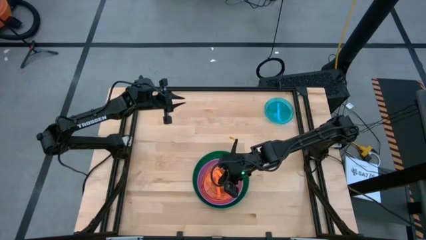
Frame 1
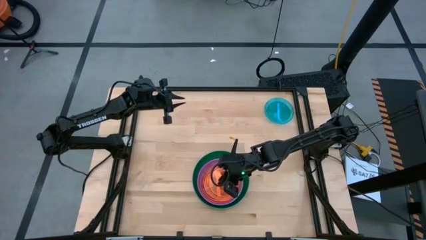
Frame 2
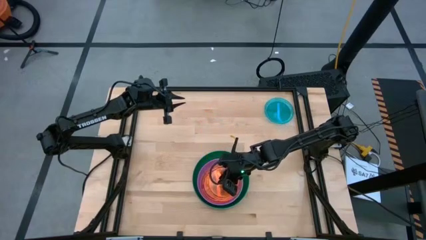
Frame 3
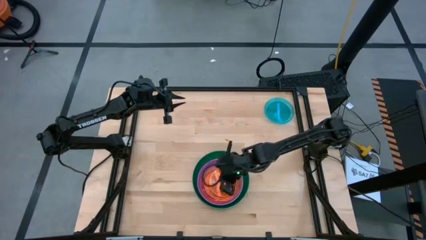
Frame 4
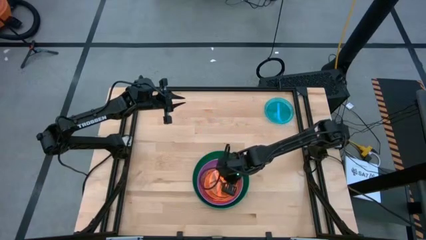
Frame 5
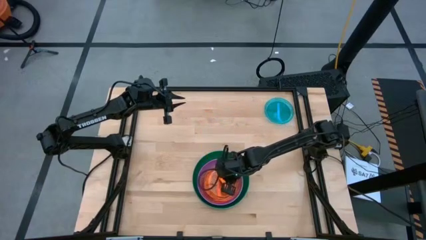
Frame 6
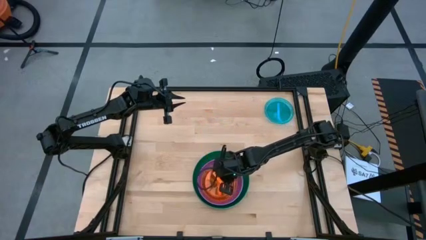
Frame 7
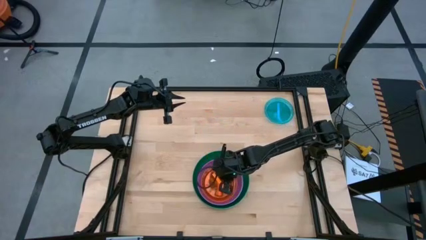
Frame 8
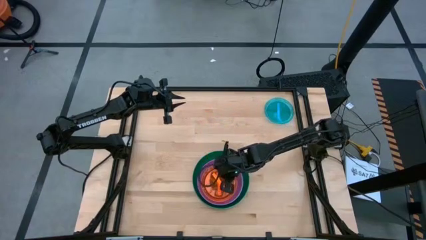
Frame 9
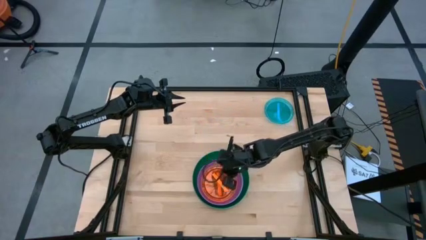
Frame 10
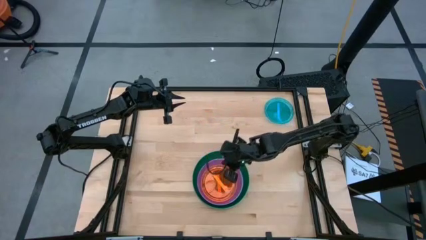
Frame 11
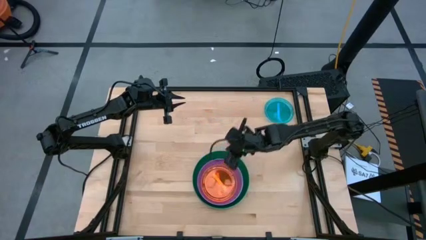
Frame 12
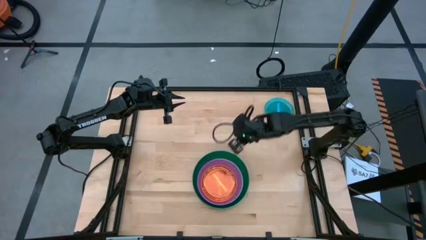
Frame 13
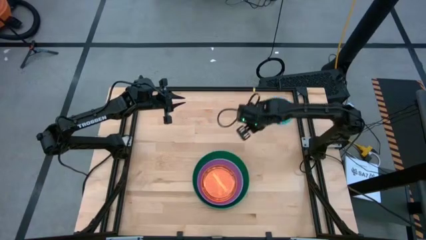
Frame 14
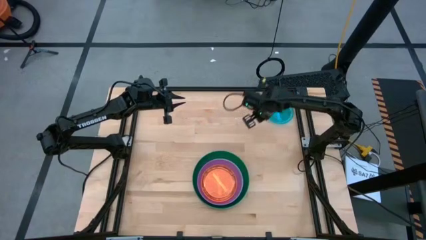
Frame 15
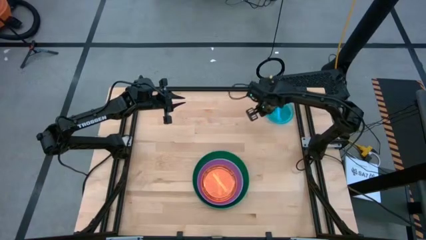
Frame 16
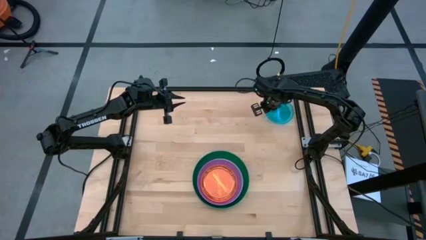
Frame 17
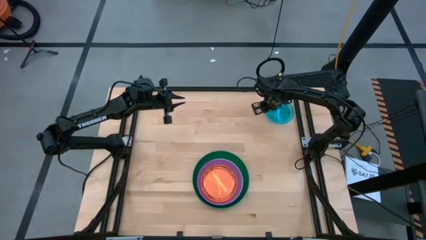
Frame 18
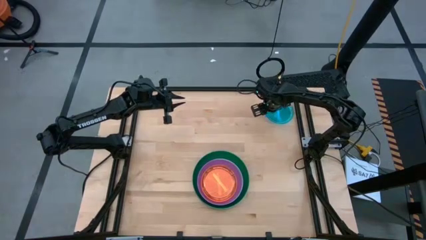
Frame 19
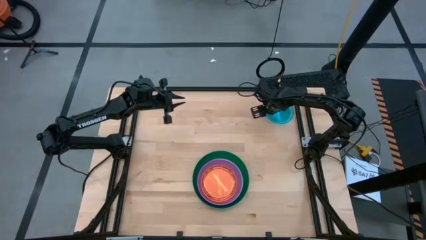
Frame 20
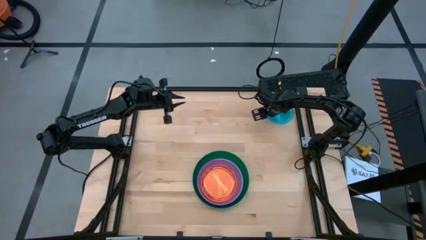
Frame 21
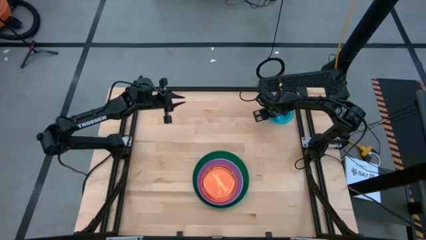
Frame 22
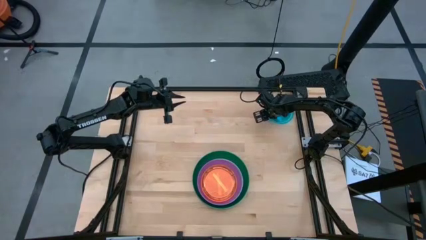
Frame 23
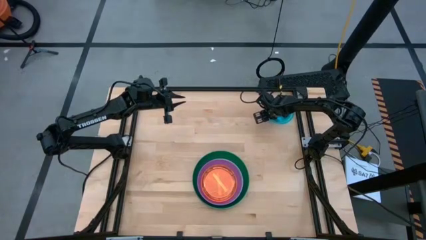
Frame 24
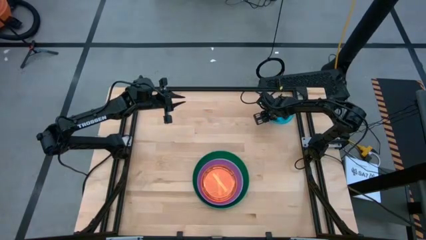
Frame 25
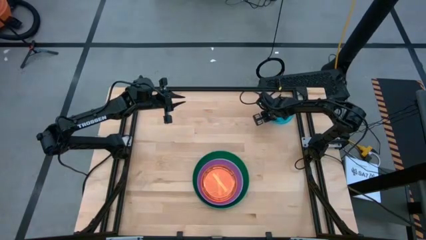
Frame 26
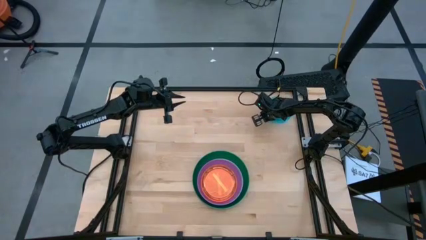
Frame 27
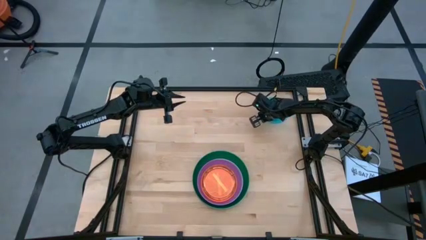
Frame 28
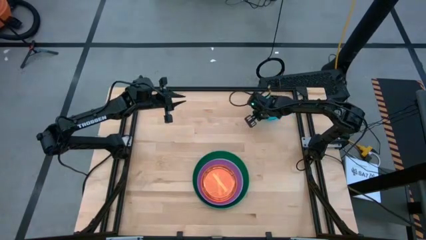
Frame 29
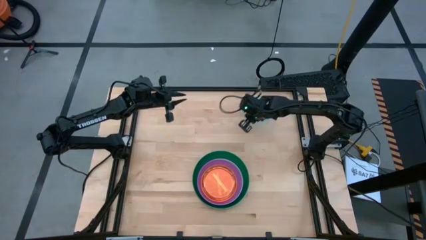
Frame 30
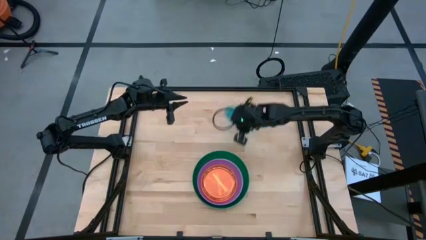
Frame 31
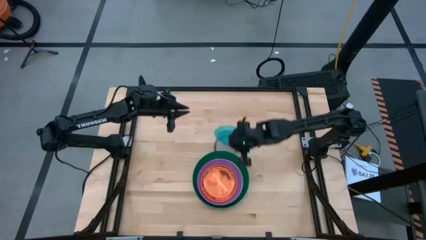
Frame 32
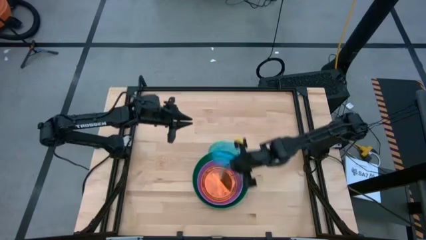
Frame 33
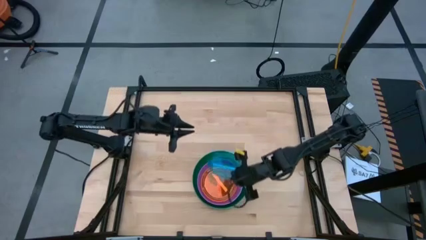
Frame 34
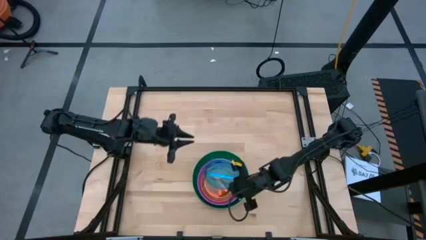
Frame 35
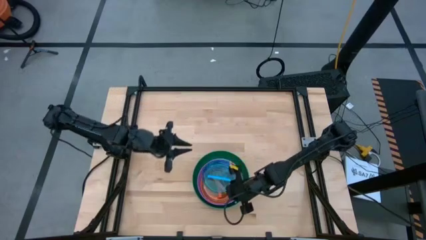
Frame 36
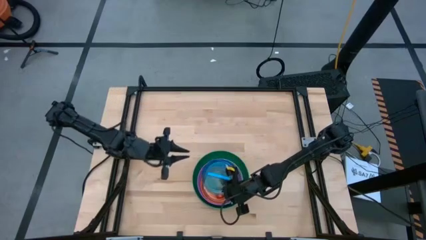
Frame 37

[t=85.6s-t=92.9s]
Task: Stack plastic plates
Stack the transparent blue plate on the transparent orange plate

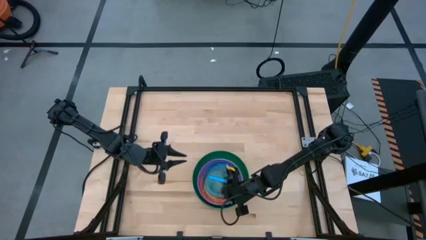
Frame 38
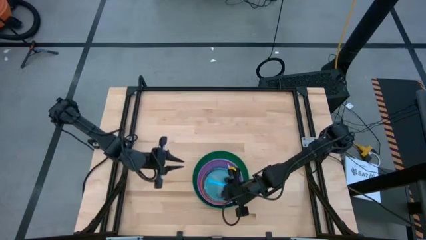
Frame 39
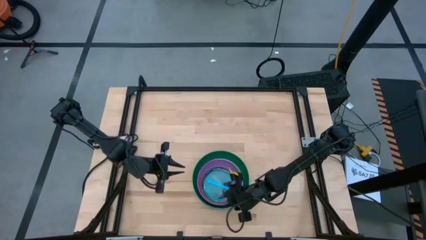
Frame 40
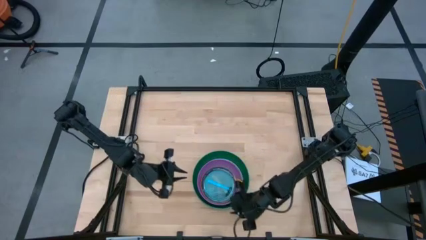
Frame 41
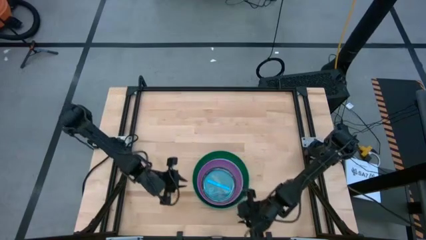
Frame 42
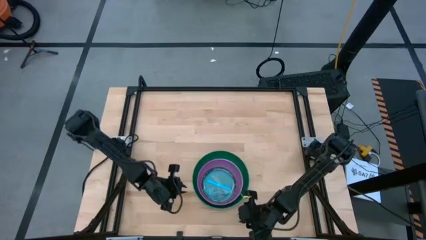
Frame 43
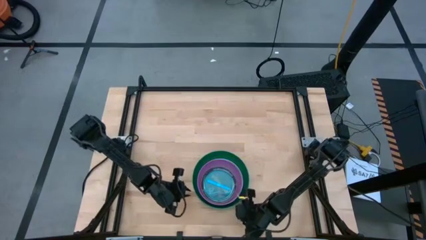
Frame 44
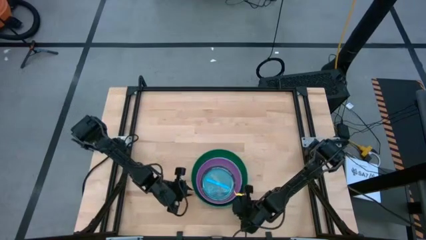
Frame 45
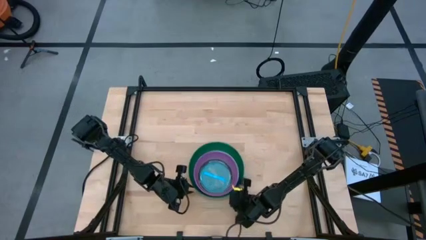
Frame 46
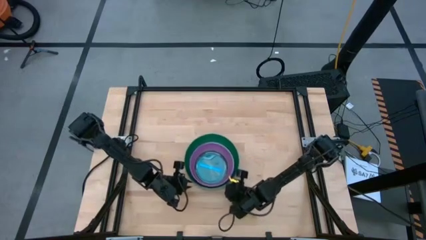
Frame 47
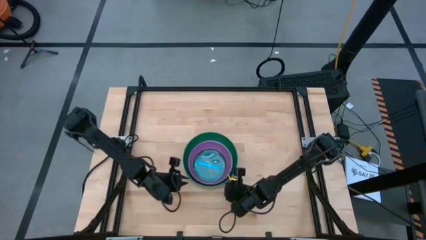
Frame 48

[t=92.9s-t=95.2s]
Move the stacked plates to the center of the table

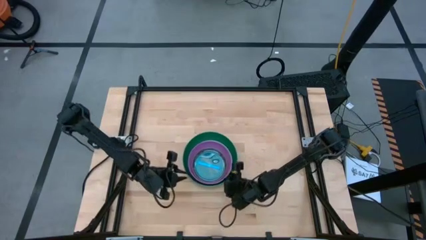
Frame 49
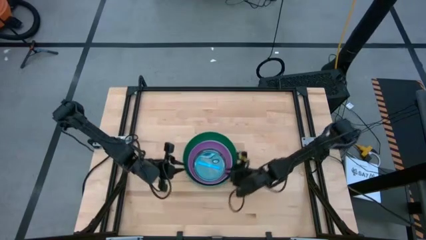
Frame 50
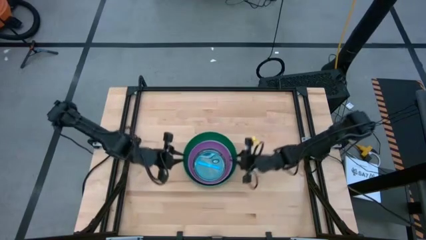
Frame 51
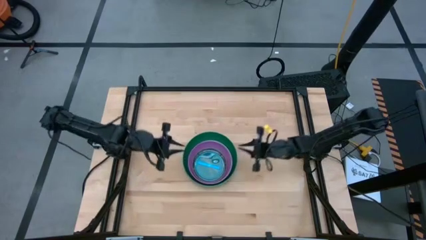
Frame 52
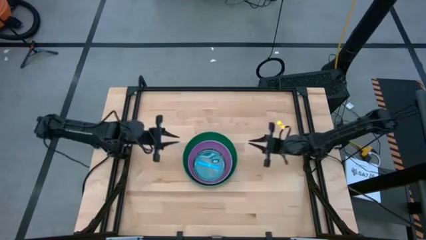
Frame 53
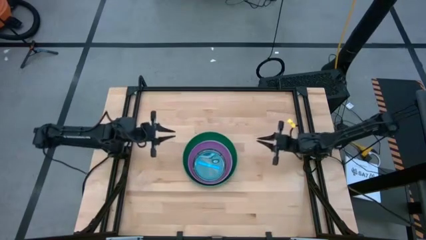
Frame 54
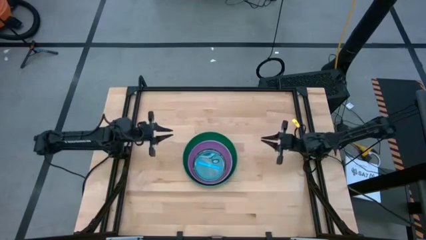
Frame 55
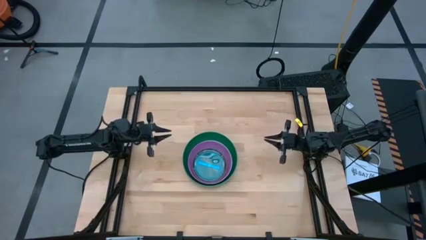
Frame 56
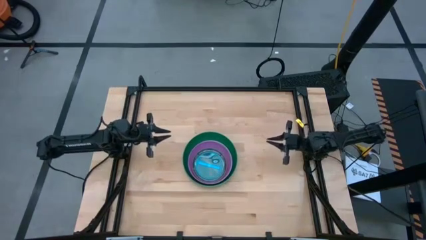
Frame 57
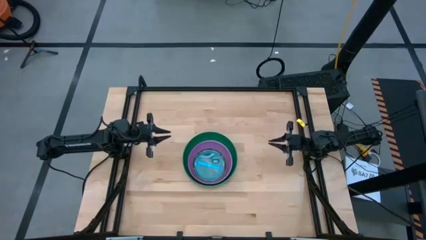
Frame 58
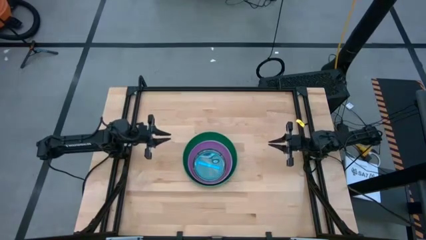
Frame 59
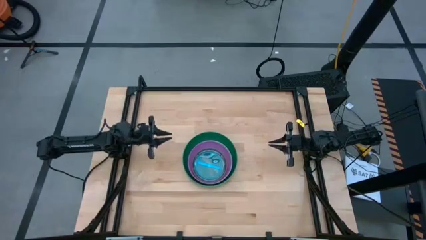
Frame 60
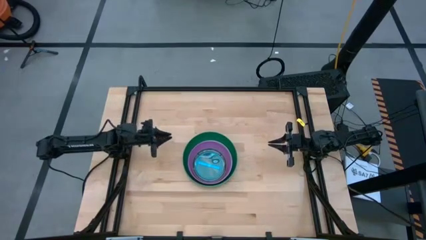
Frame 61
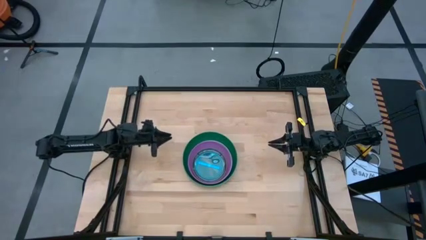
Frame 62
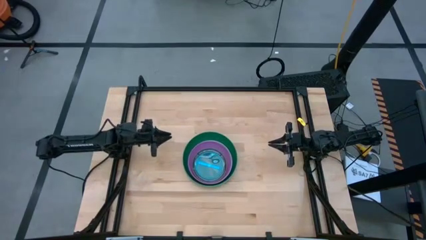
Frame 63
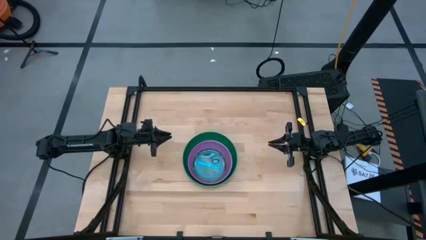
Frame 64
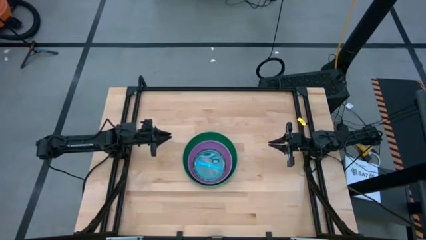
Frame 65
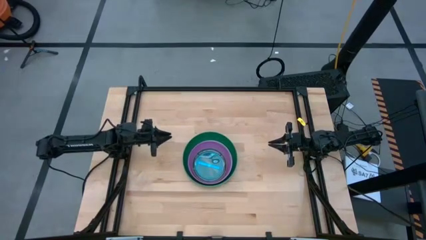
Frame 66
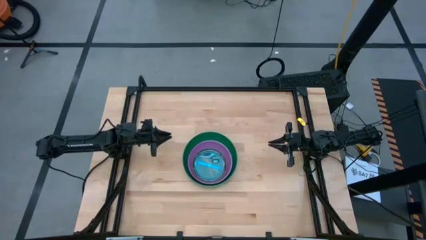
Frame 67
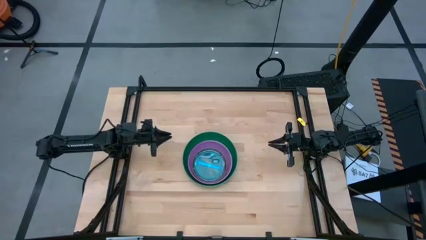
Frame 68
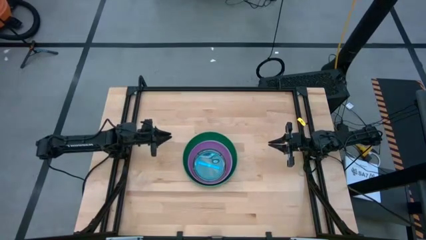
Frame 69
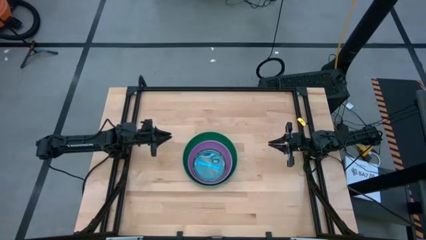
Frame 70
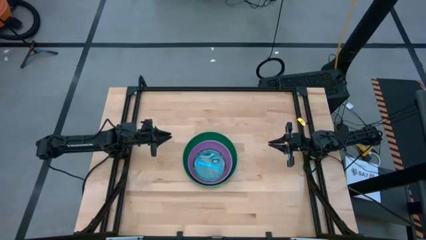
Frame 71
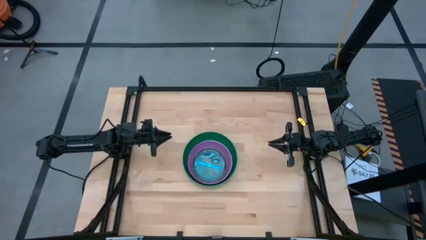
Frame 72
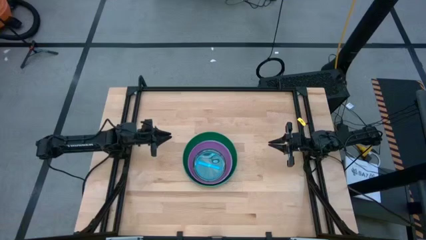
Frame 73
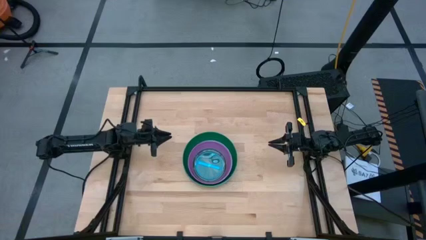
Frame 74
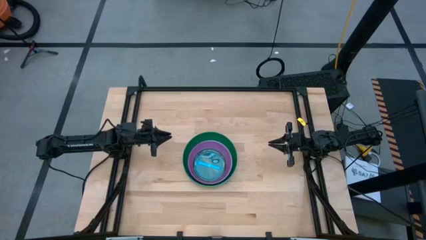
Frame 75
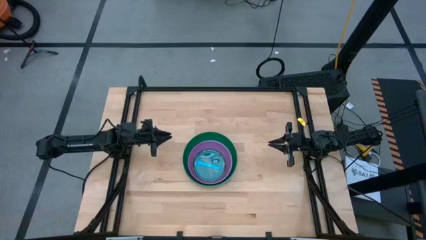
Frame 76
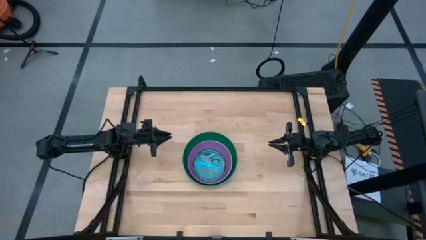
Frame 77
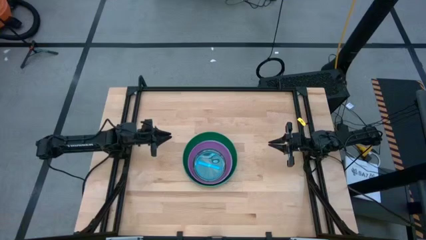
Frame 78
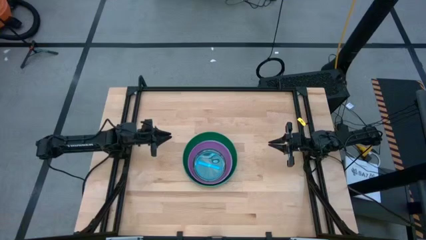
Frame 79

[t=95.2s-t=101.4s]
Return to Home Position

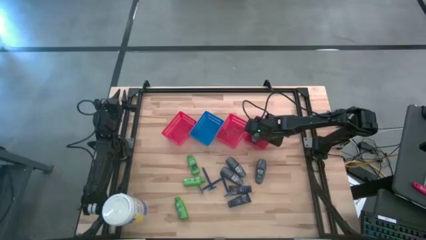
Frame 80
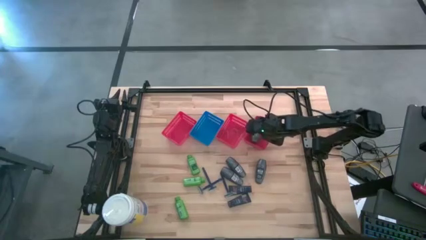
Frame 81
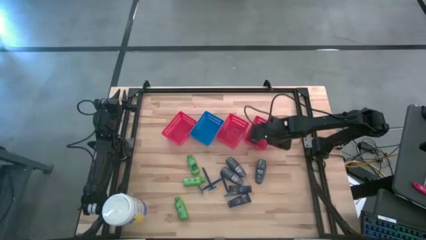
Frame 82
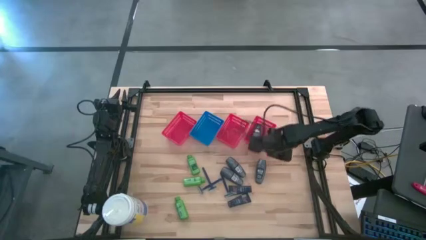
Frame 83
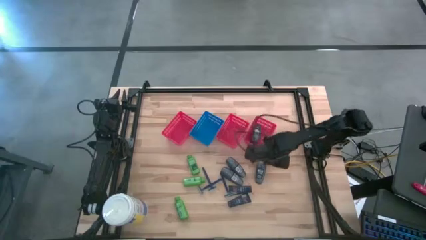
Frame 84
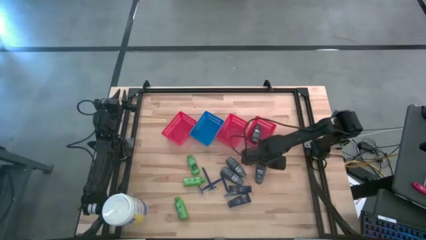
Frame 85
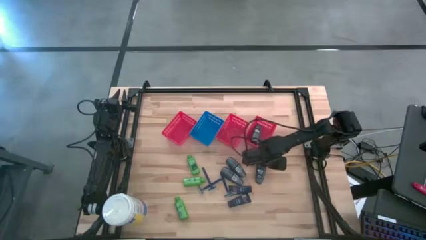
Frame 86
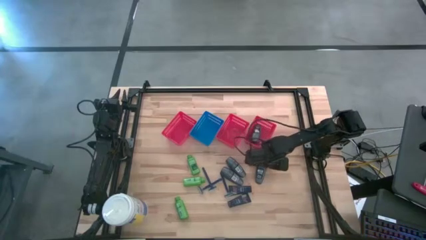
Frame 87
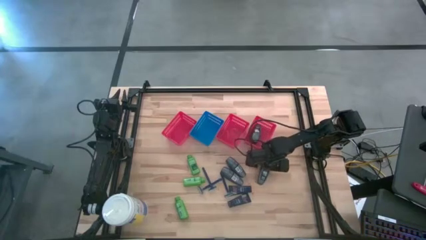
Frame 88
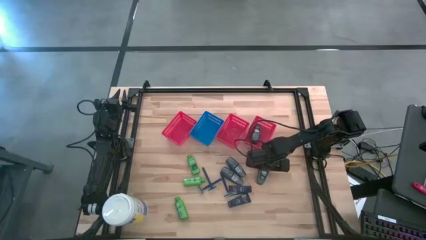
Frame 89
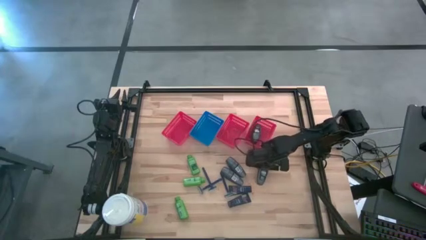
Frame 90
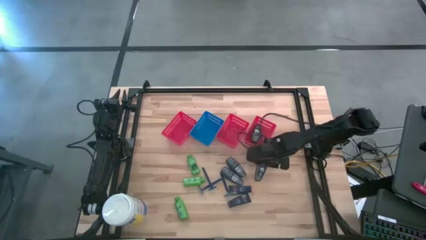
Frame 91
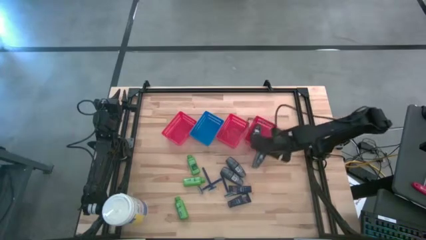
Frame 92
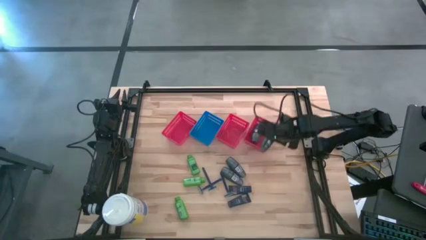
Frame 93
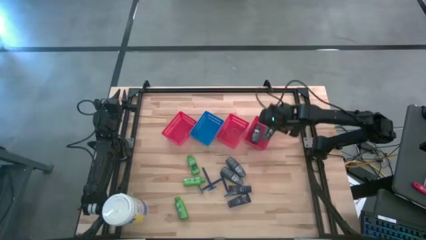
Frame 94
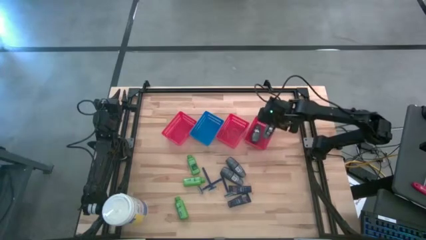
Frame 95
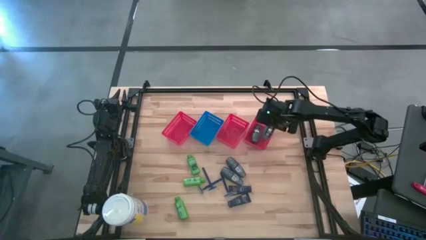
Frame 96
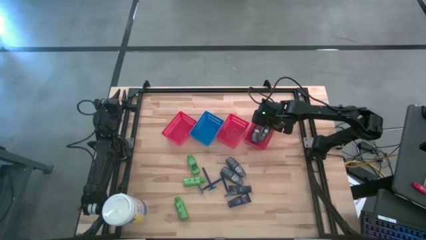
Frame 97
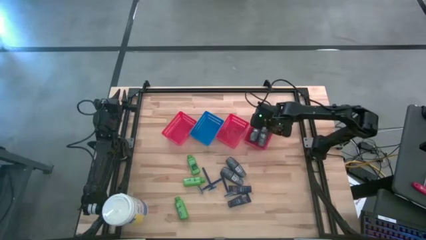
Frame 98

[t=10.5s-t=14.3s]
Task: Pick & Place Travel size toiletries
Put the black deodorant into the right red bin
